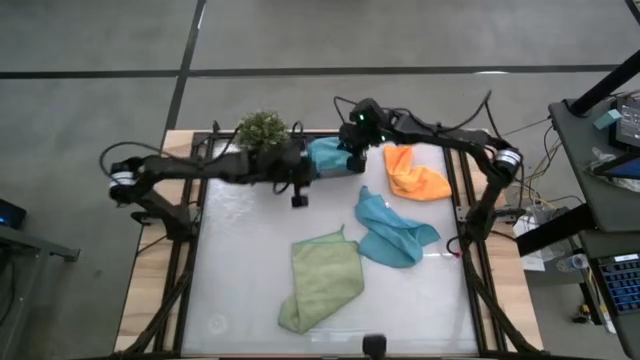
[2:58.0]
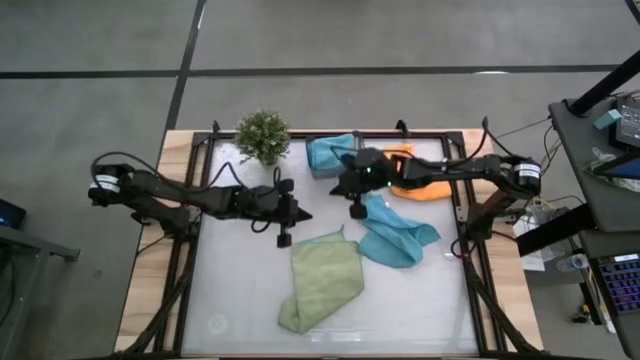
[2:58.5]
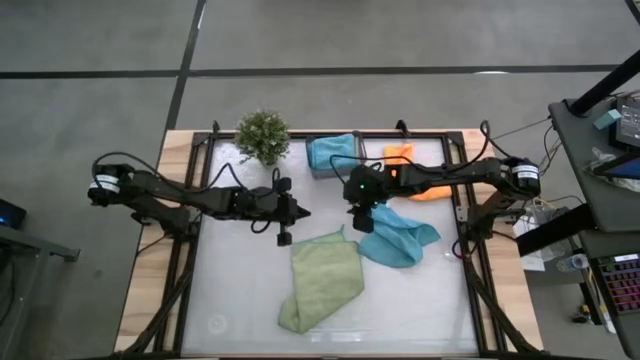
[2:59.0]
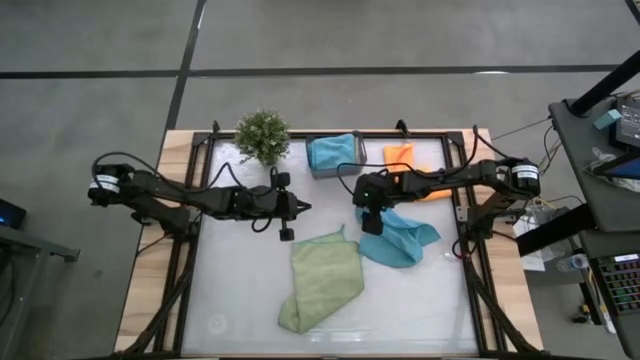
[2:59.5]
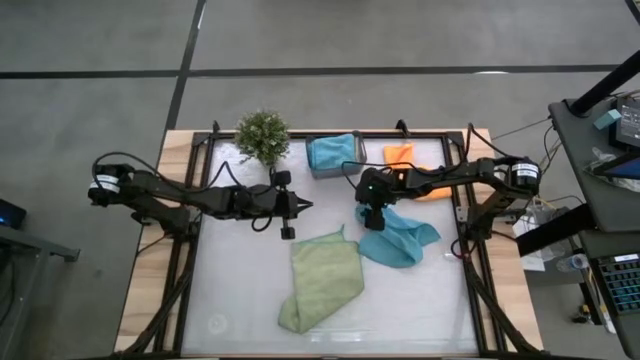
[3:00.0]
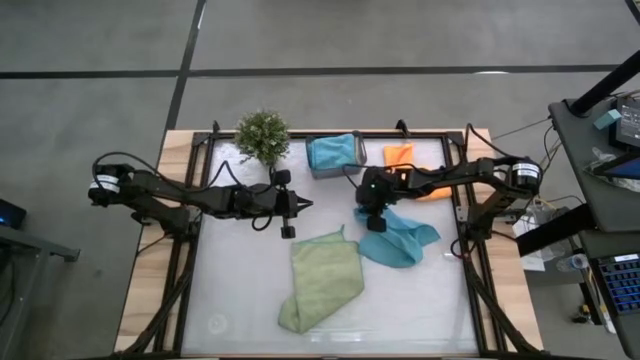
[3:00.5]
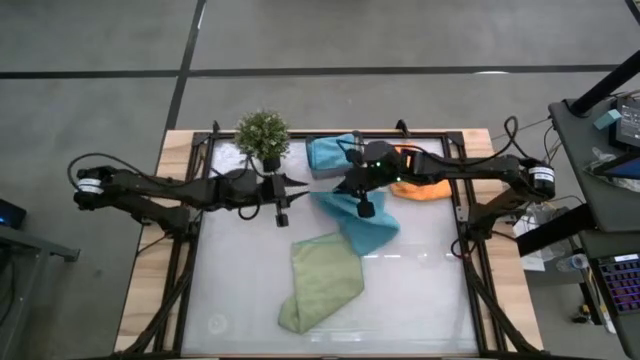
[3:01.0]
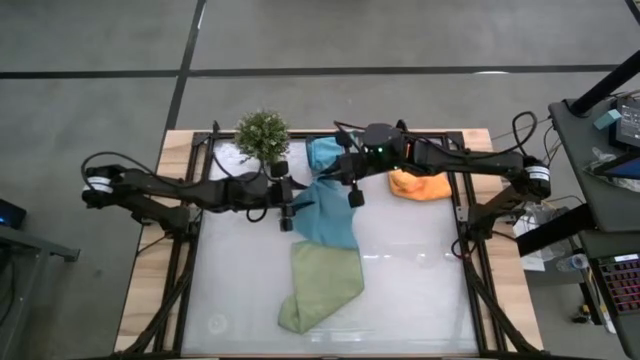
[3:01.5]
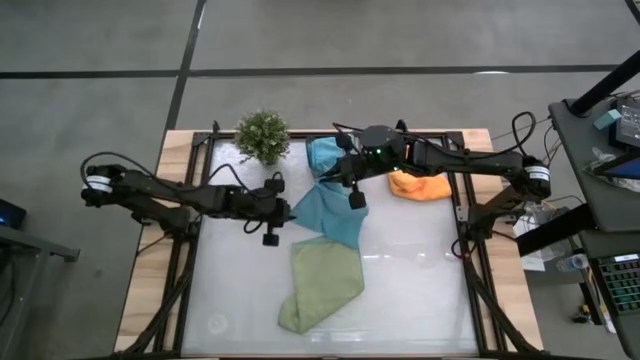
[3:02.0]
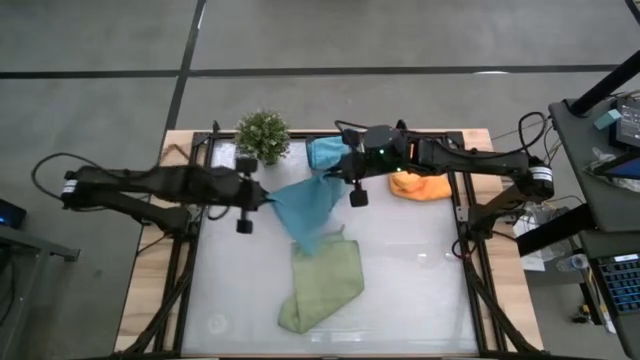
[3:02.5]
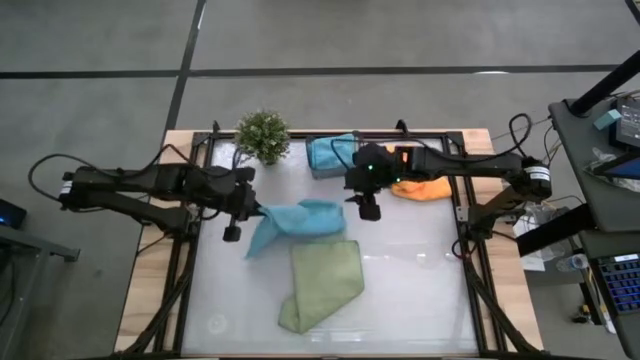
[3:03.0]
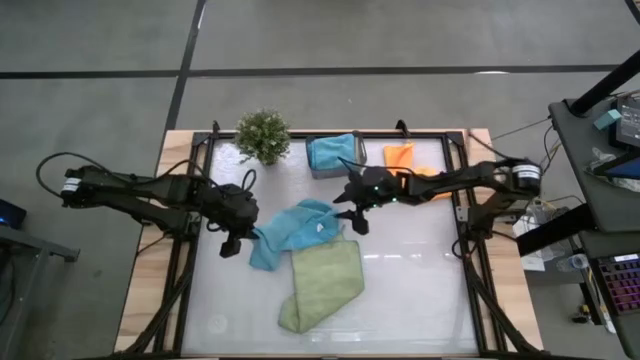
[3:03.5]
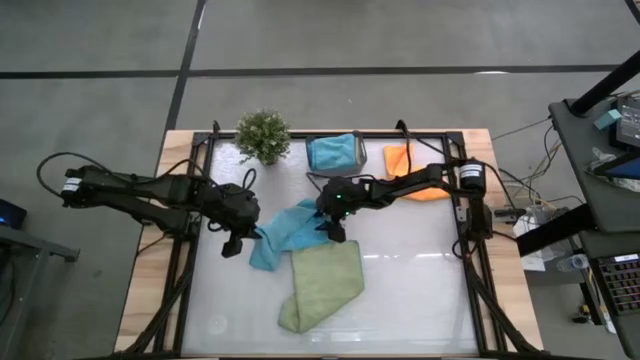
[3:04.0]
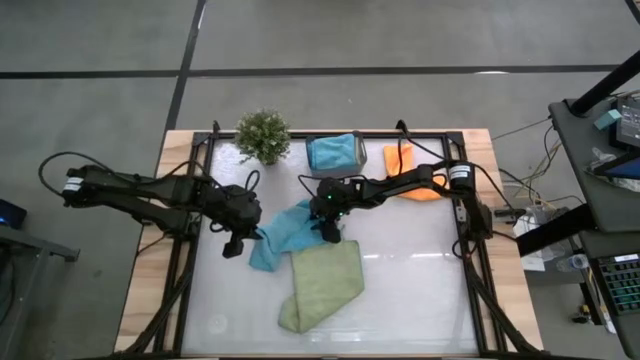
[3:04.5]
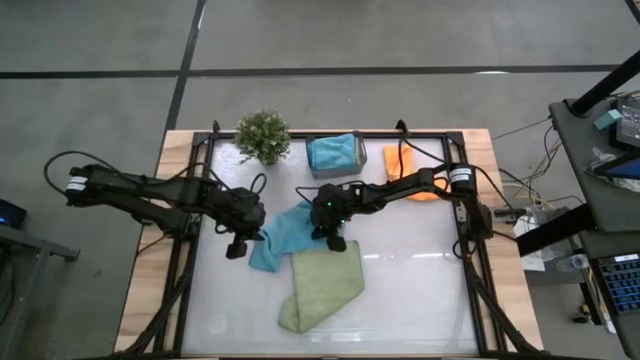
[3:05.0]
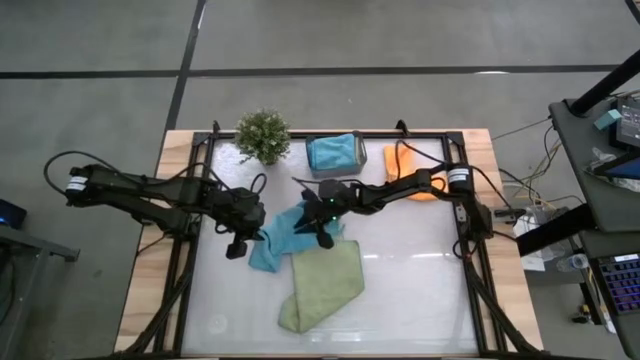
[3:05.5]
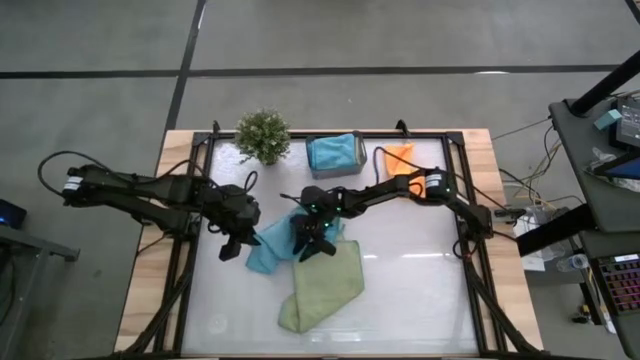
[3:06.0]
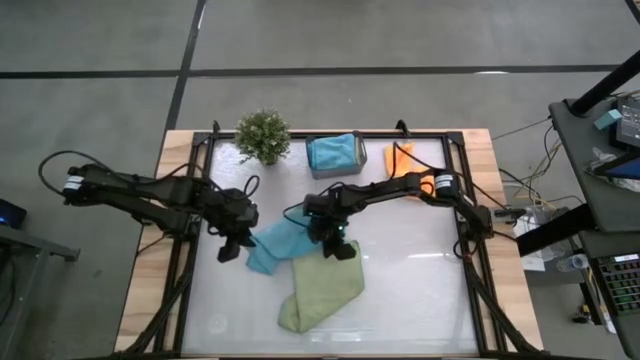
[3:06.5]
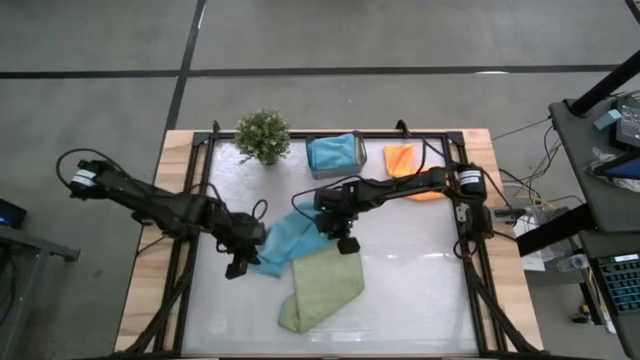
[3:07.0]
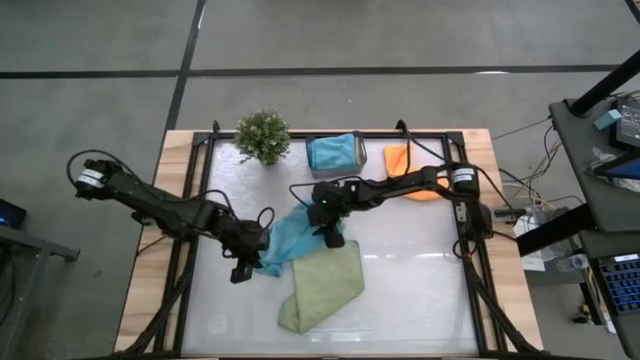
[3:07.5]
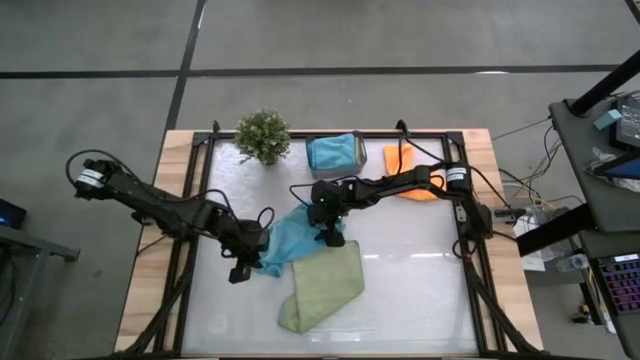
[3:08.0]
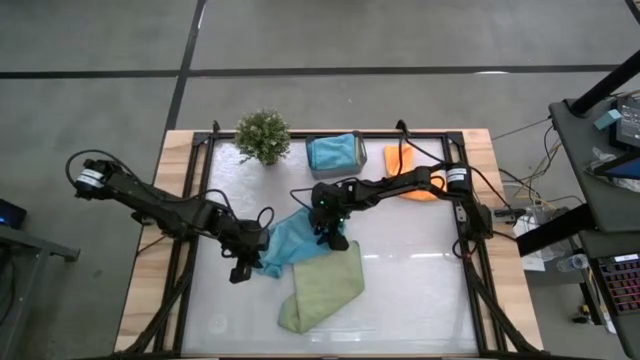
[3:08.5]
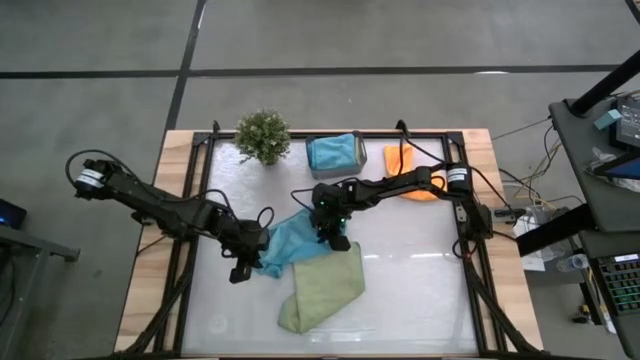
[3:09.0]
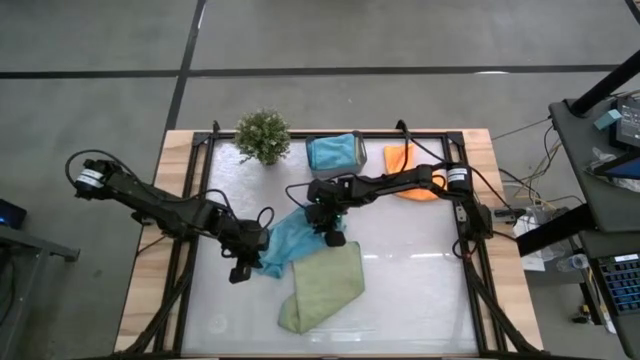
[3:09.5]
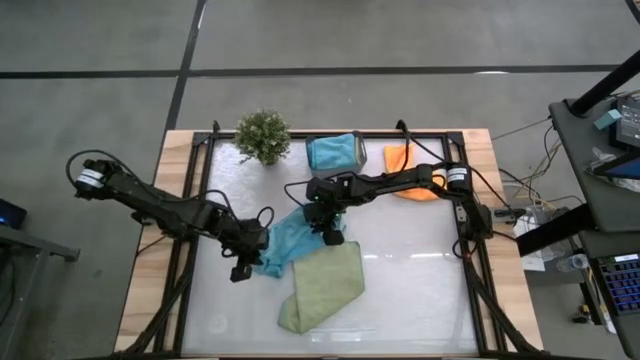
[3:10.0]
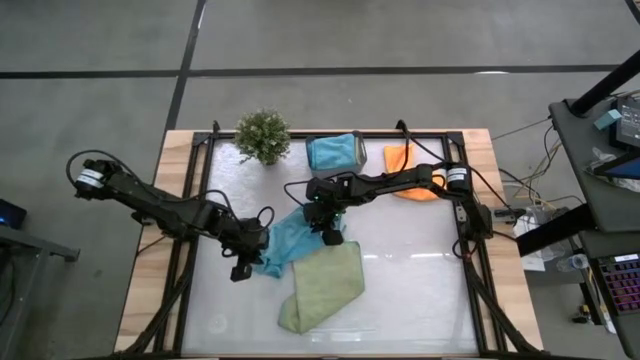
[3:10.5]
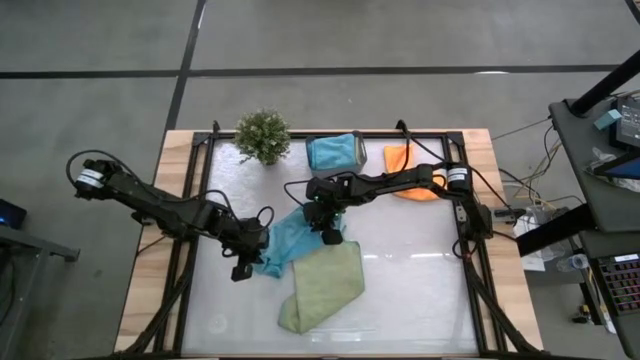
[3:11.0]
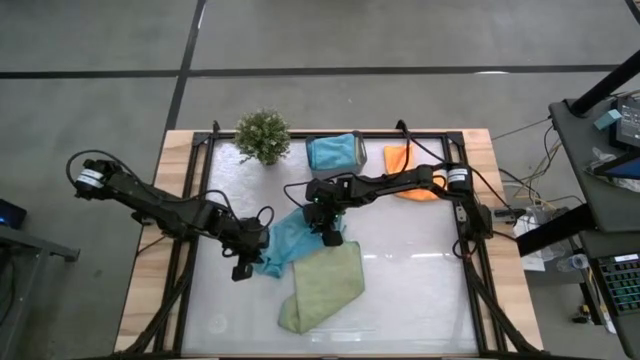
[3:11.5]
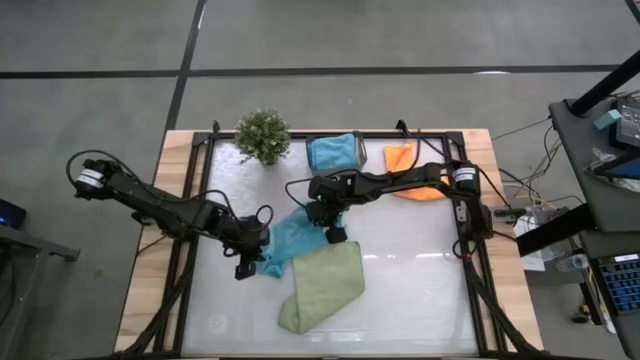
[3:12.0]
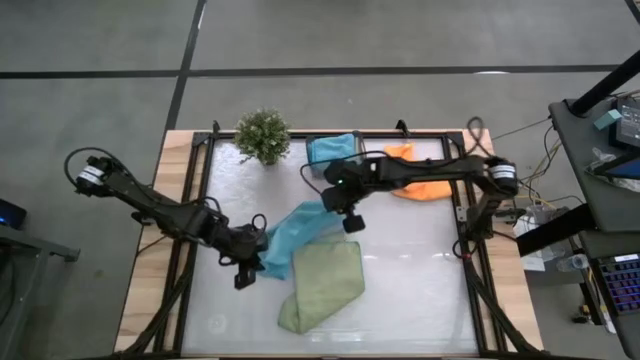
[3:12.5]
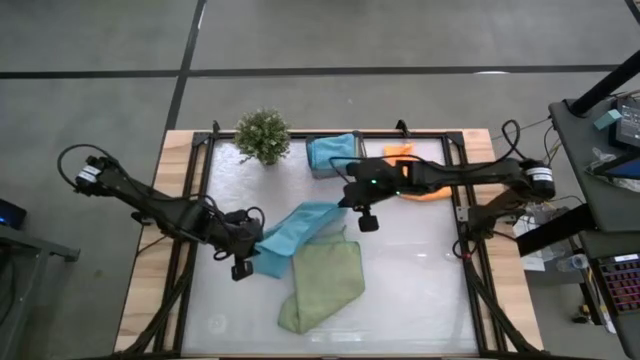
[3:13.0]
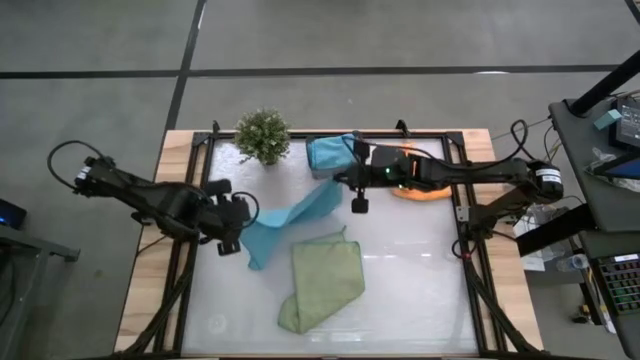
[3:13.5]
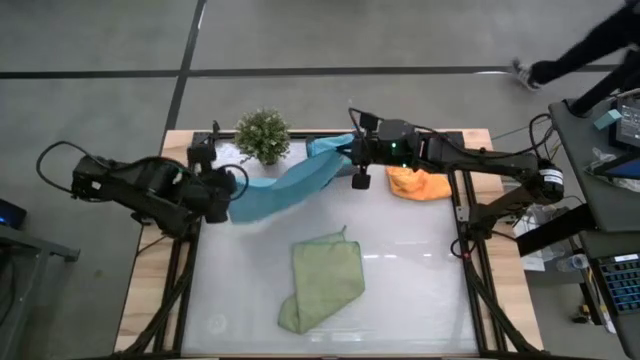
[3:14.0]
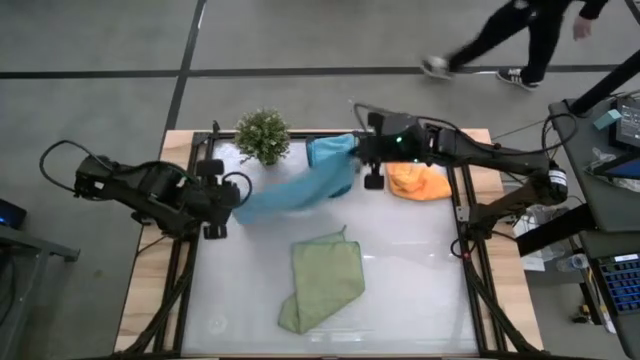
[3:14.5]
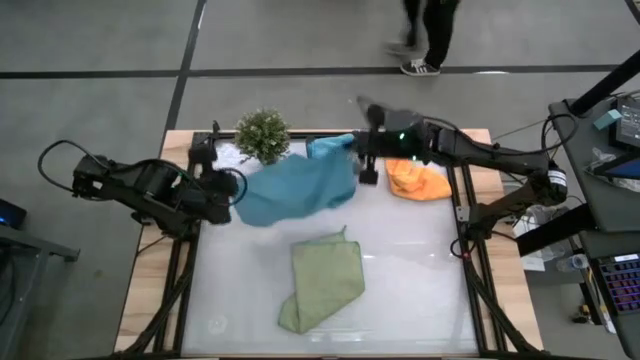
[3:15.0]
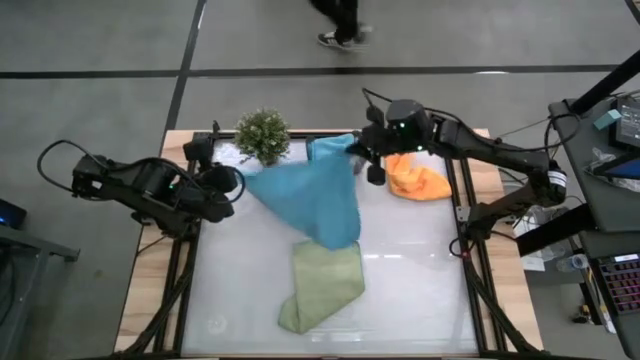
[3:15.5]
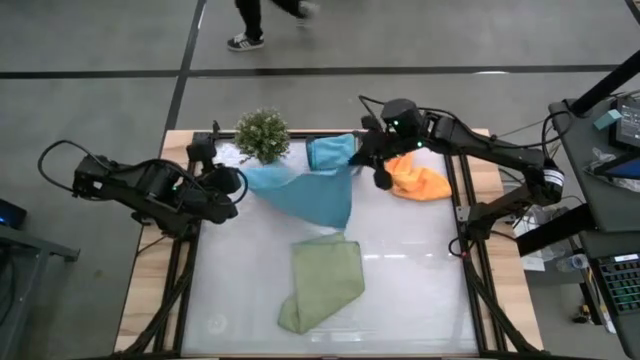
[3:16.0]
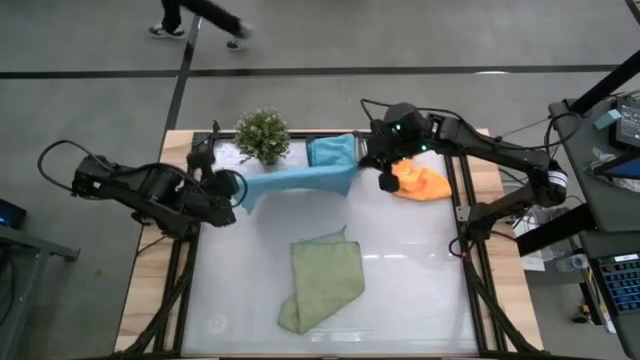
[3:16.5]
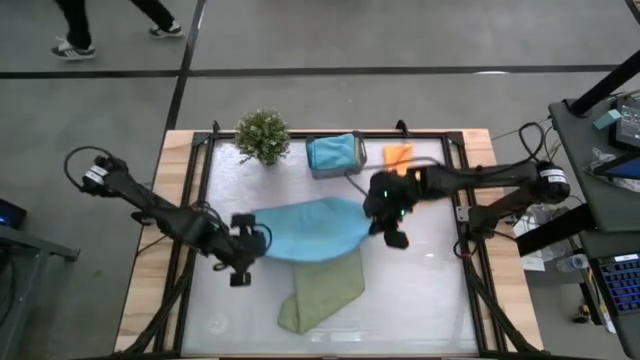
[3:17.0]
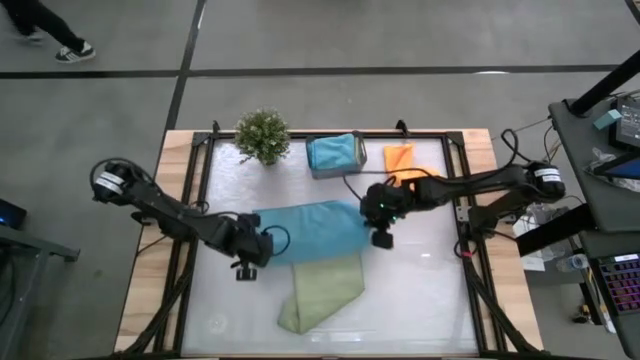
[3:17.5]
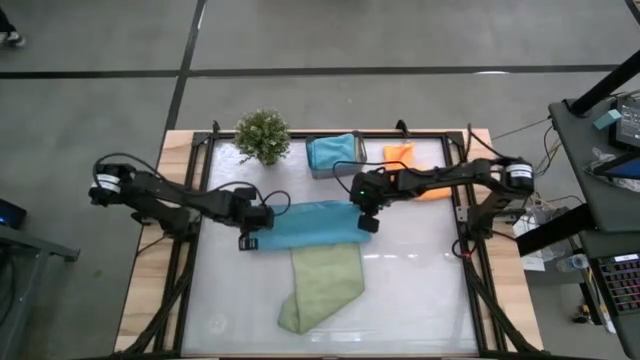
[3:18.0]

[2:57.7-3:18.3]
Task: Fold microfiber towels
Fold the blue towel

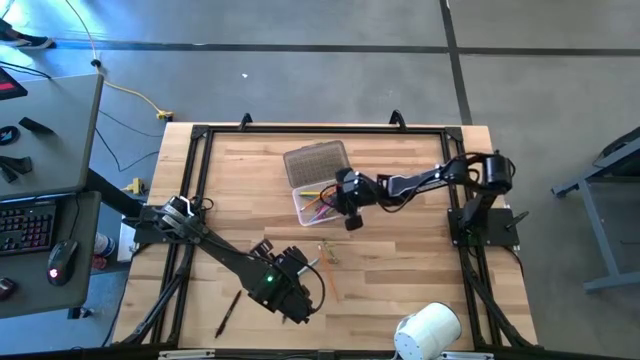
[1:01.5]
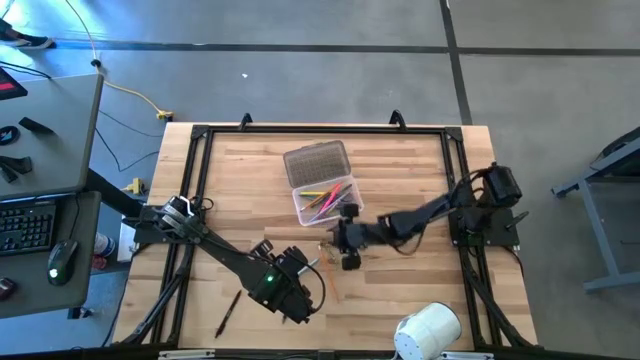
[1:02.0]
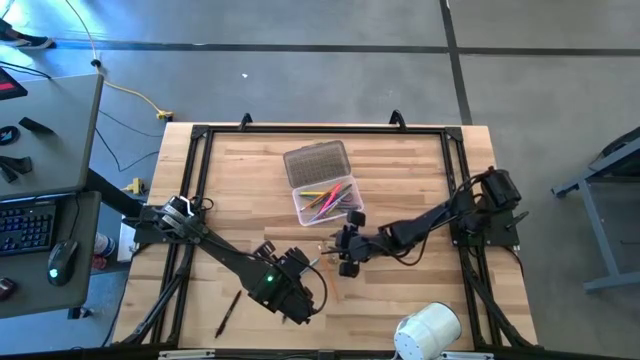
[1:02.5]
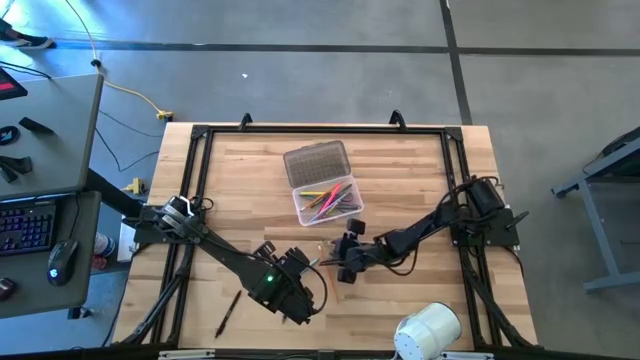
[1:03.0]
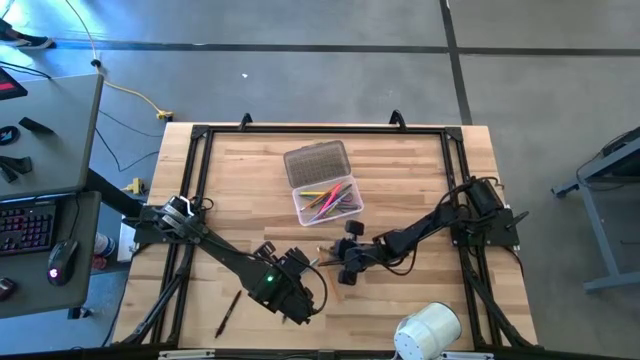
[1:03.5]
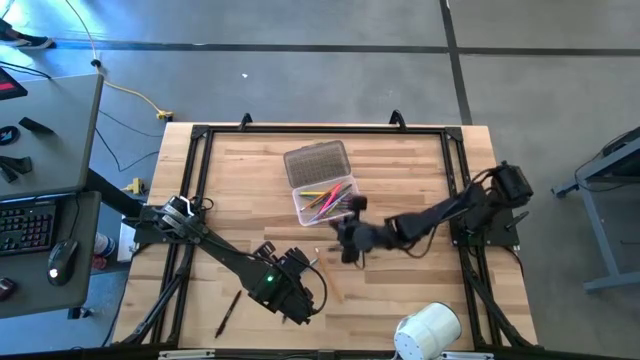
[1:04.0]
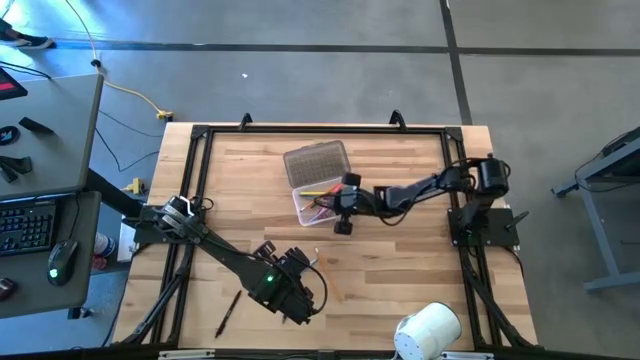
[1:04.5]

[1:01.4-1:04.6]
Task: Pick & place school supplies into a supply box
Put the light green crayon into the supply box
